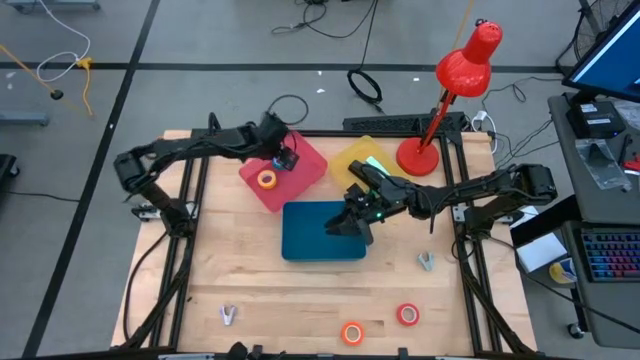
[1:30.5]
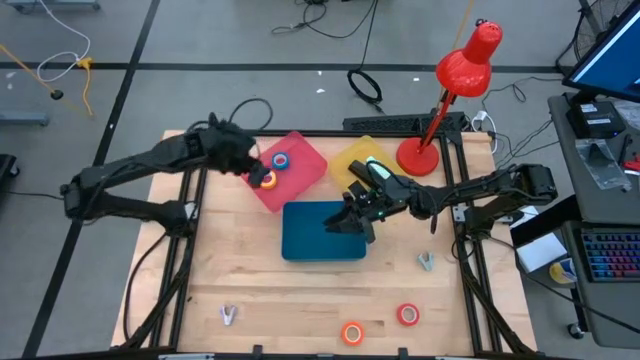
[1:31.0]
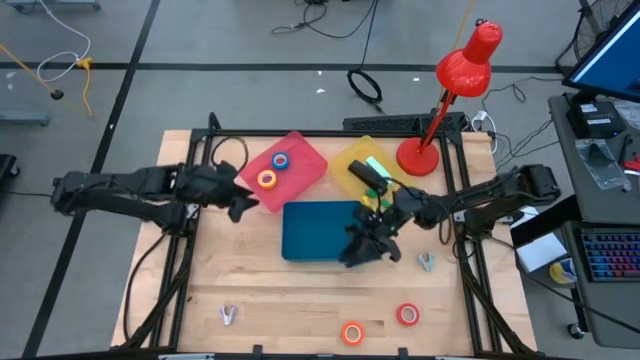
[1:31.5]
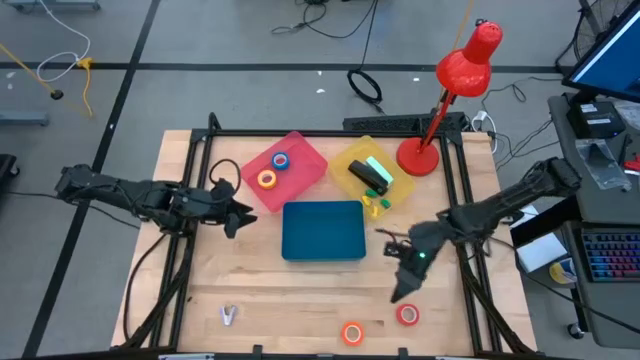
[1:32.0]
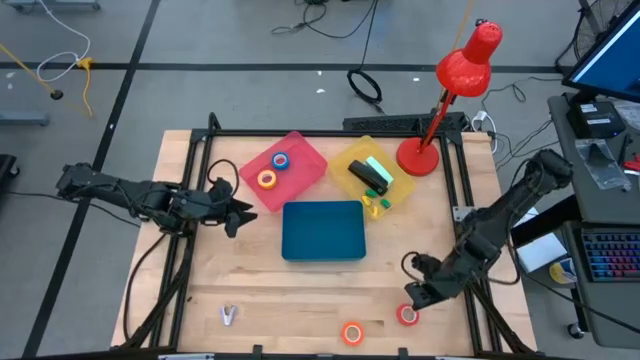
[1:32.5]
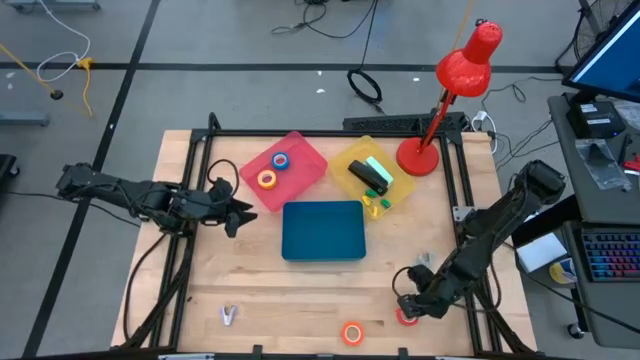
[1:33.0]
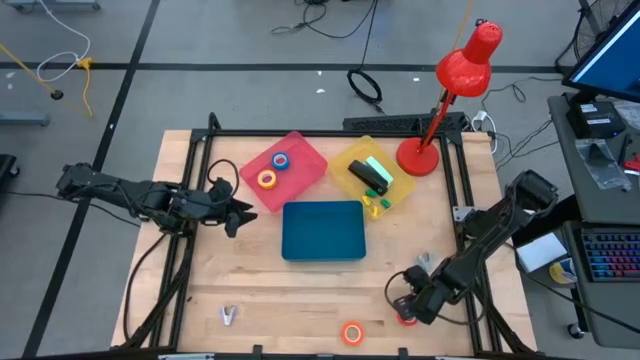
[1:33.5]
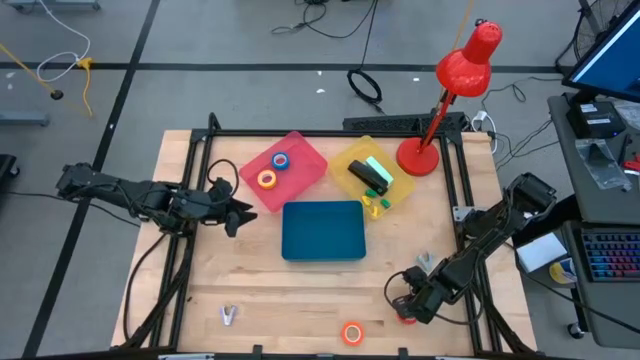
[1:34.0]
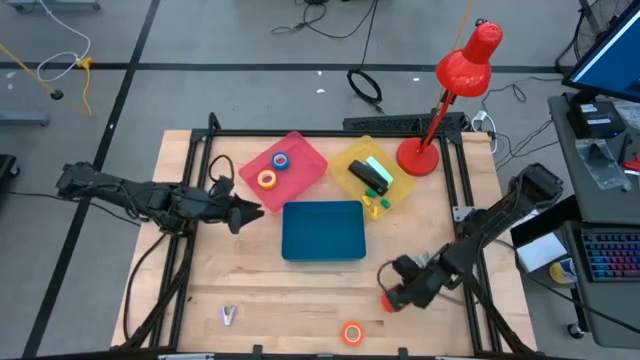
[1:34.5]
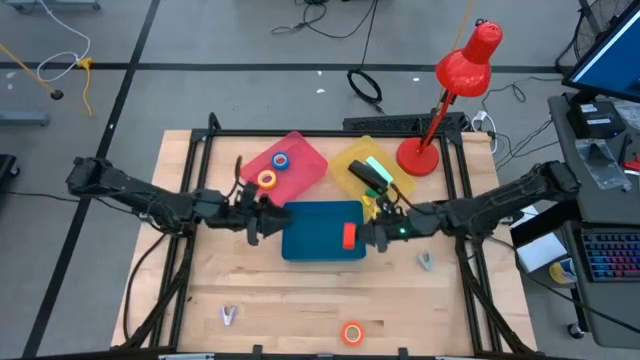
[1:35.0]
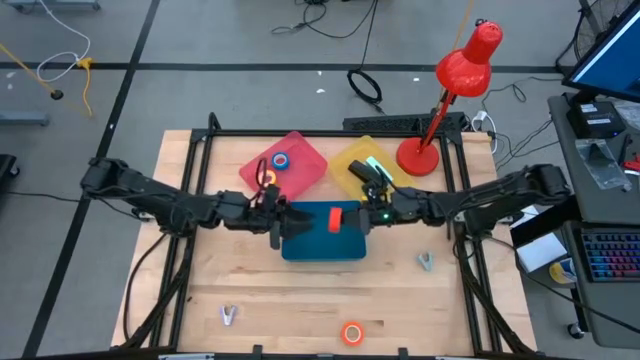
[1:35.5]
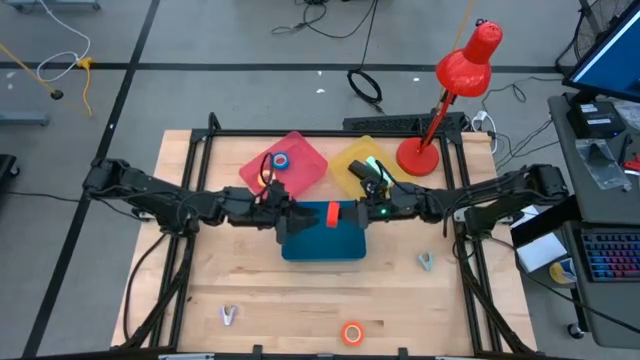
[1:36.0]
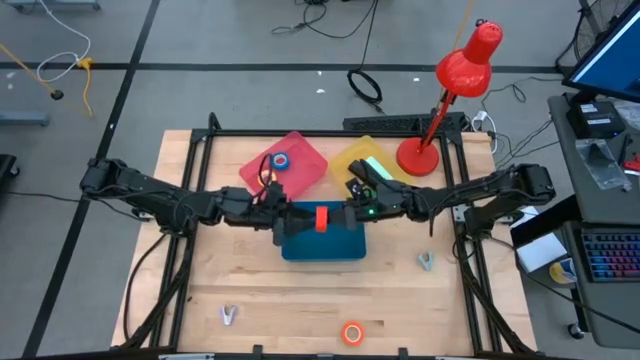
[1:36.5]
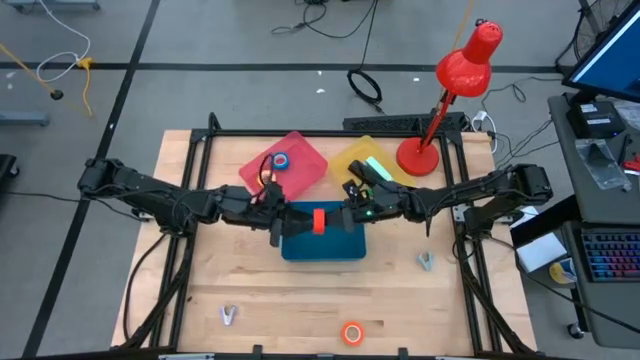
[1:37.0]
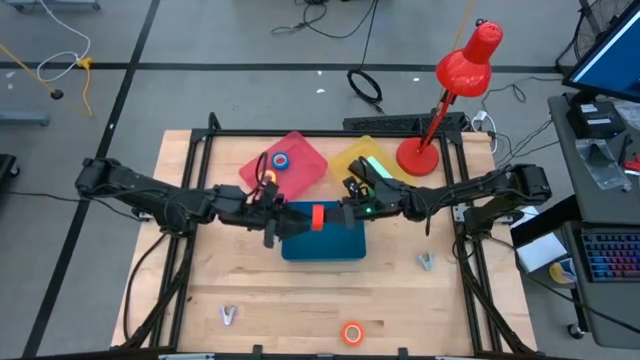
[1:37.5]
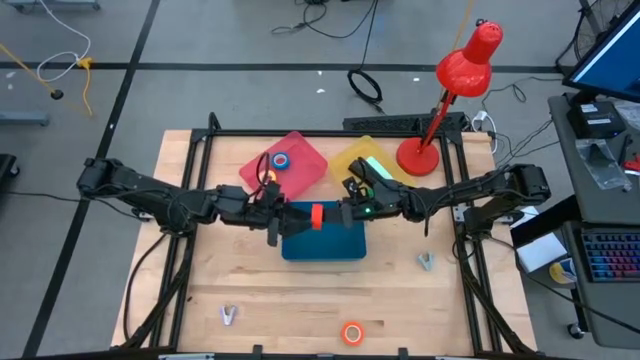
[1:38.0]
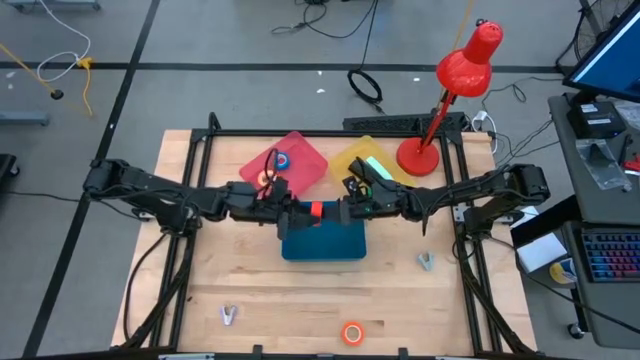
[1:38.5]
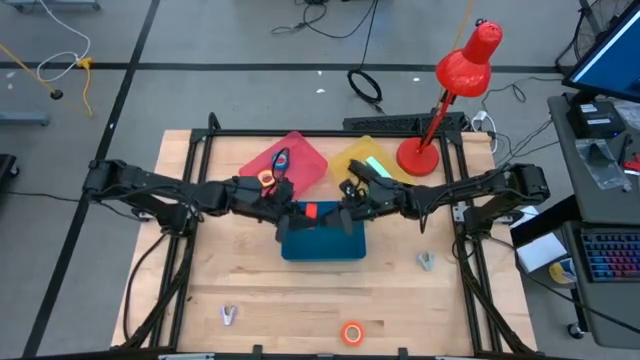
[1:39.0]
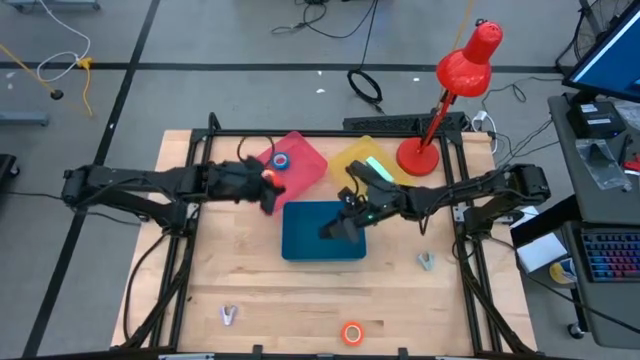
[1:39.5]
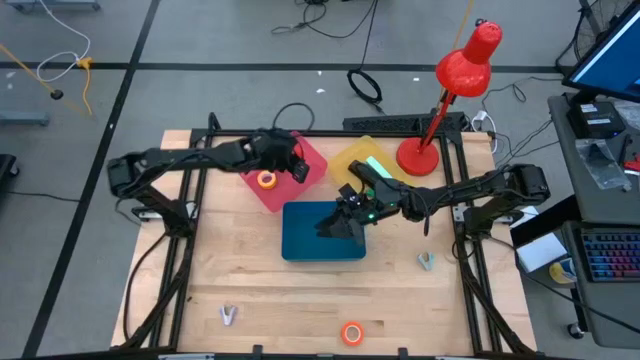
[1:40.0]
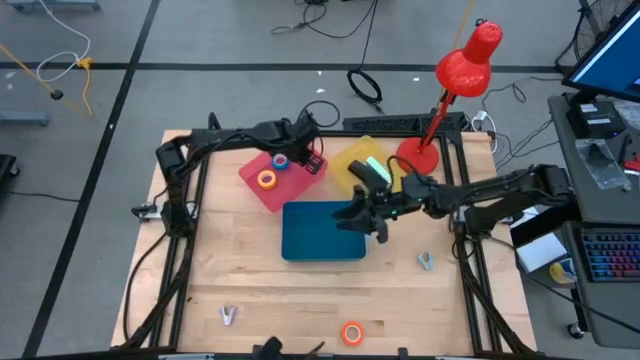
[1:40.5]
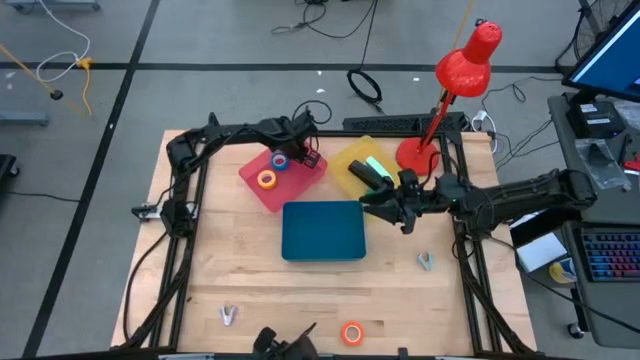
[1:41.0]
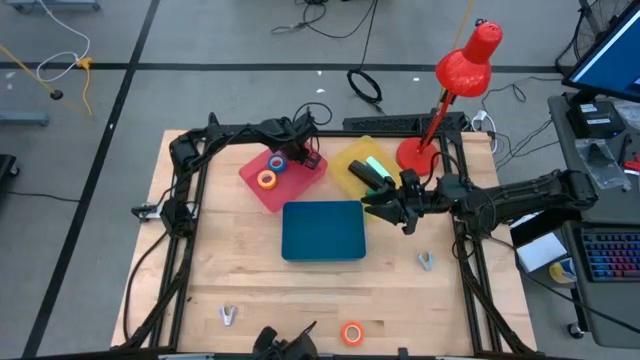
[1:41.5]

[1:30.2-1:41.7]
Task: Pick and place Stapler, Stapler remover, tape
Put the red tape into the pink bin

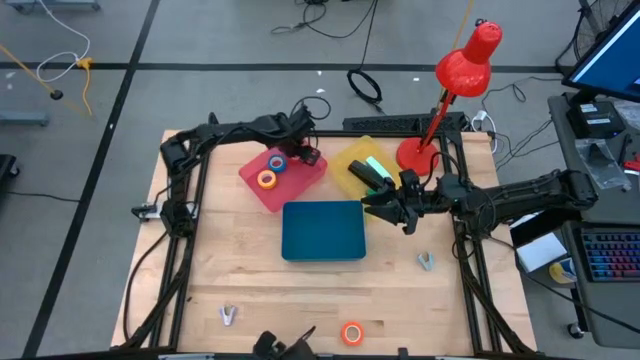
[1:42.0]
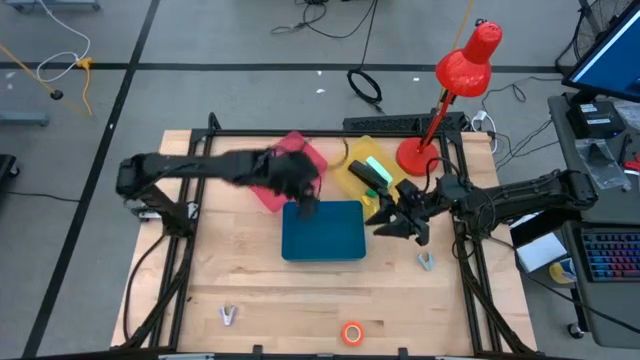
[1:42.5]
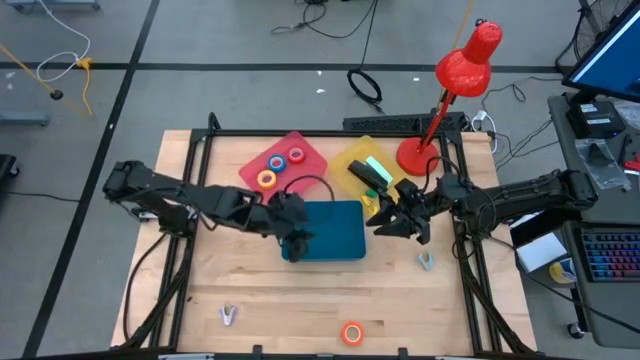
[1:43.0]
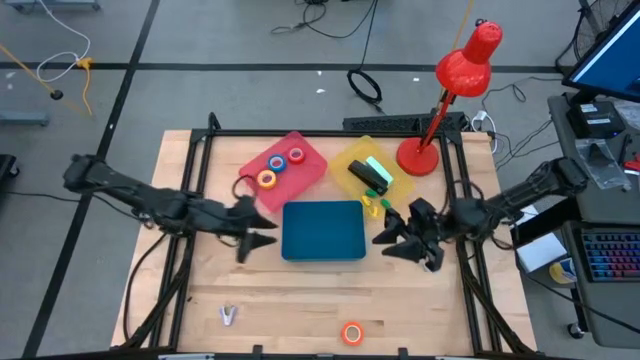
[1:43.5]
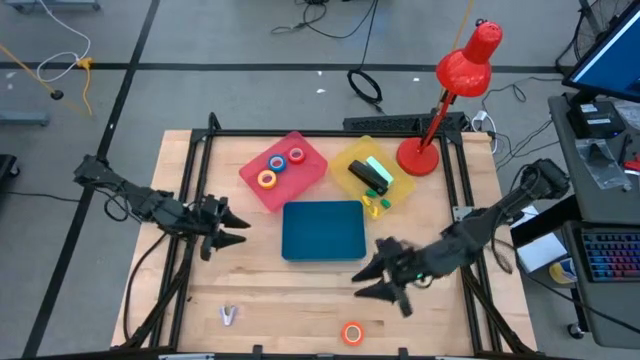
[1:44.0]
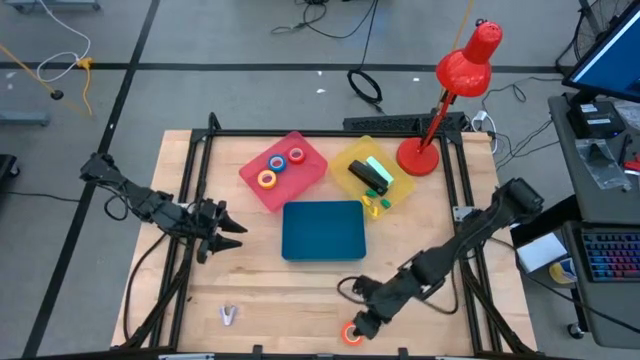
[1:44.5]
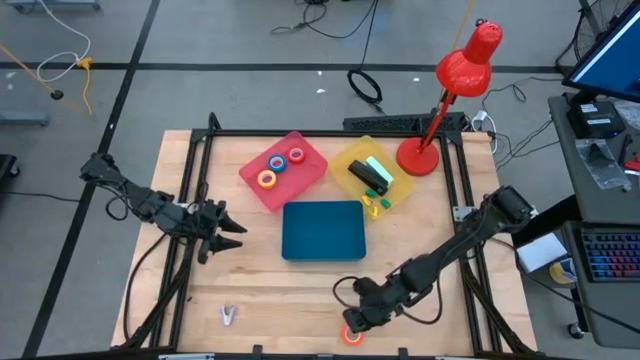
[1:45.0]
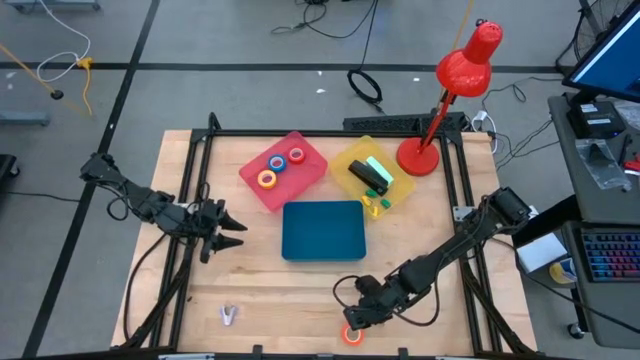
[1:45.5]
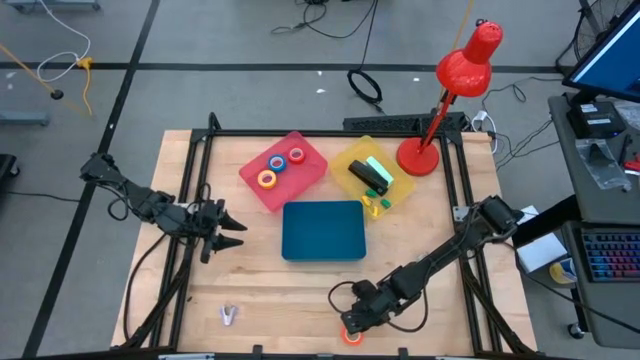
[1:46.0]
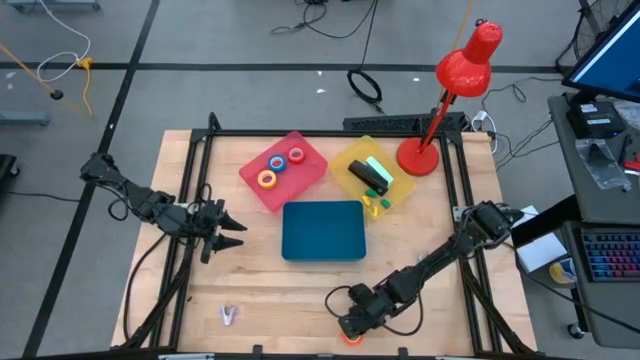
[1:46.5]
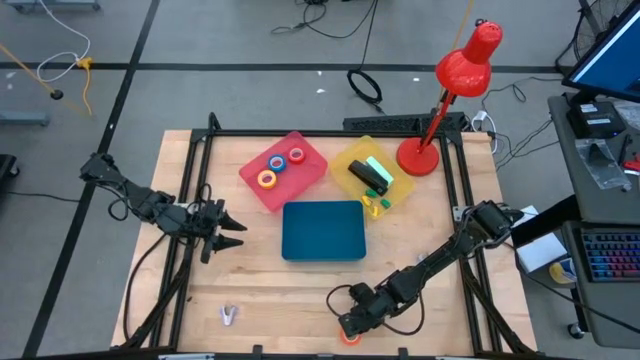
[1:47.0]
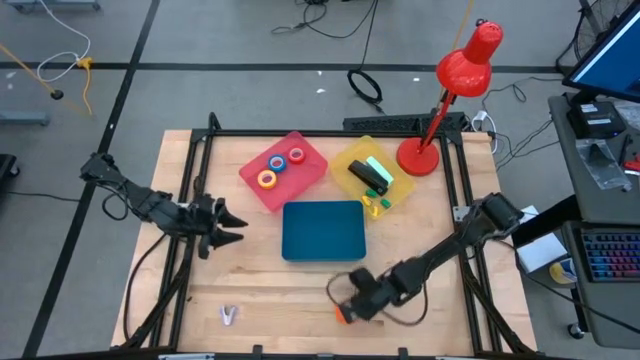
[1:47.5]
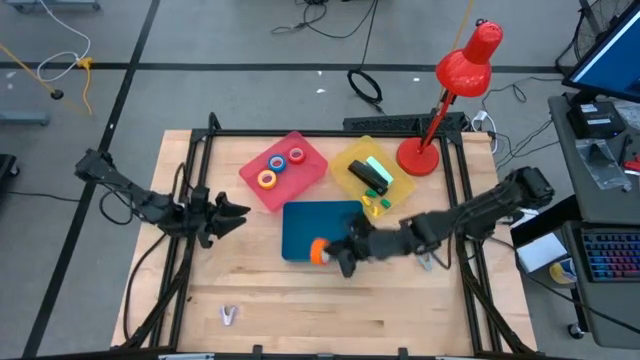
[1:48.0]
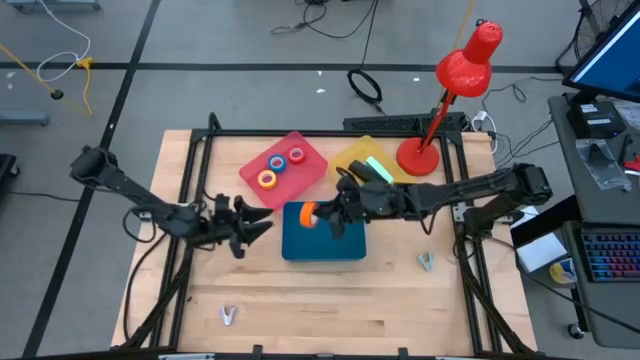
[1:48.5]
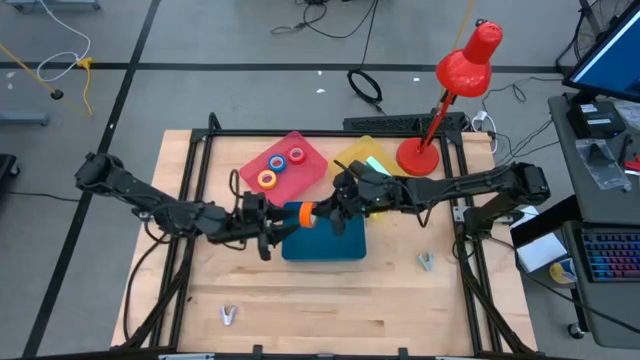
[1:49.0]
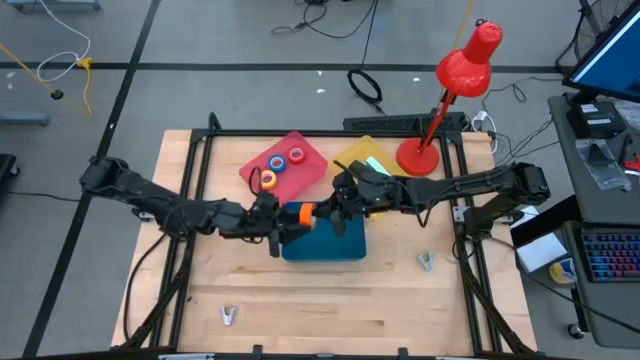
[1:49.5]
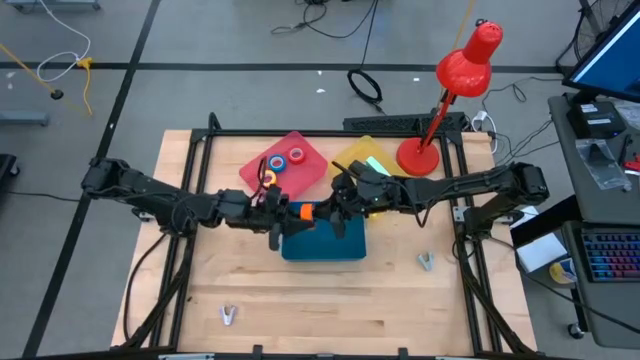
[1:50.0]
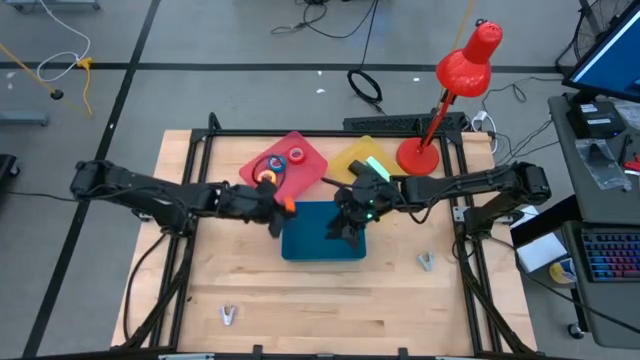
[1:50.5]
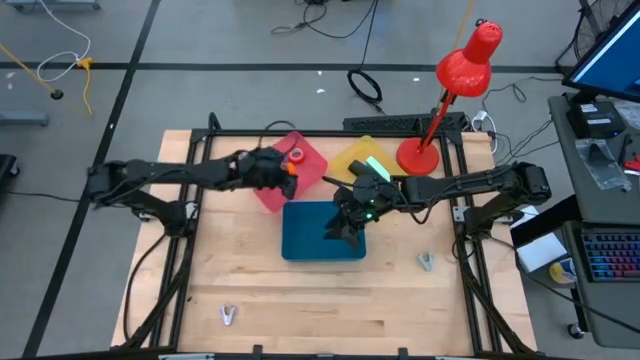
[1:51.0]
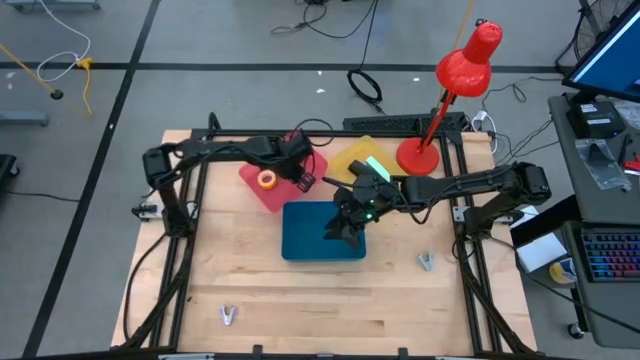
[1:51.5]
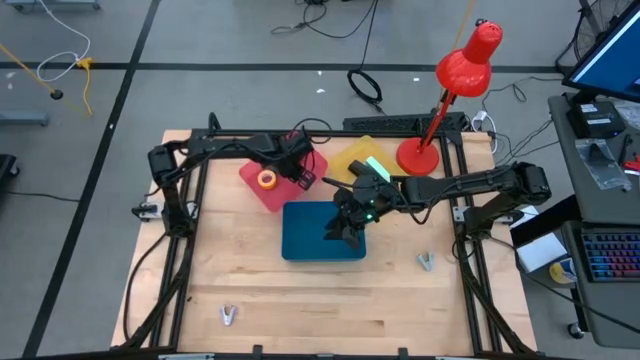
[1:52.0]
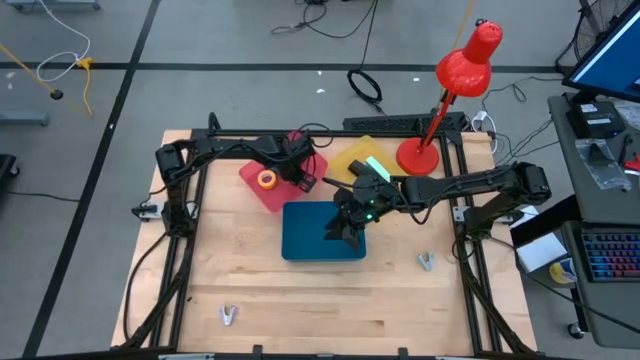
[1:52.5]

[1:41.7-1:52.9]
Put the orange tape into the pink bin
